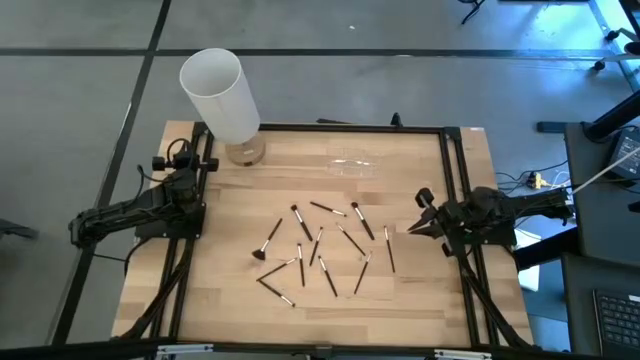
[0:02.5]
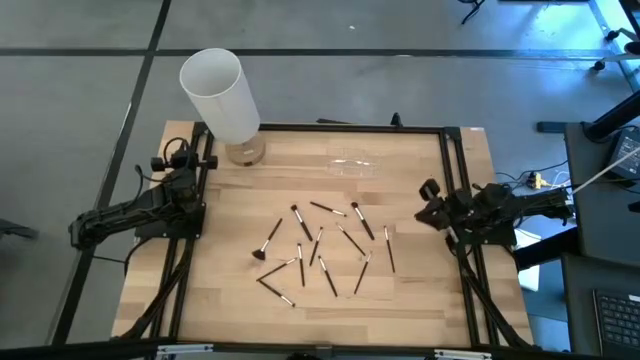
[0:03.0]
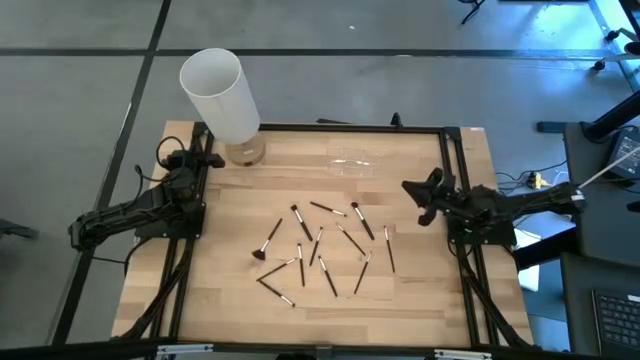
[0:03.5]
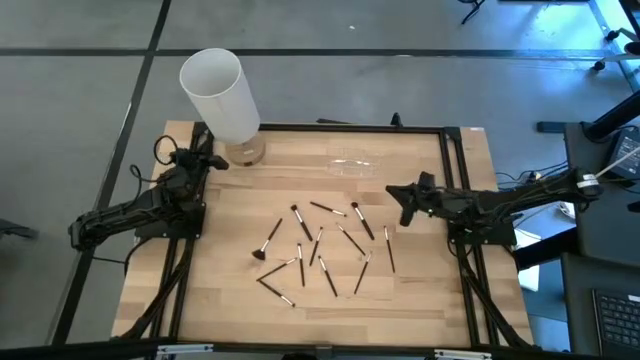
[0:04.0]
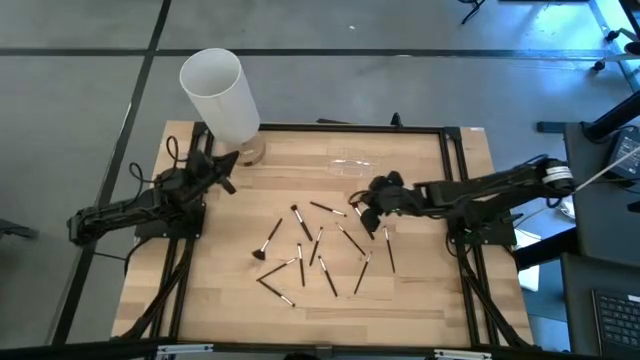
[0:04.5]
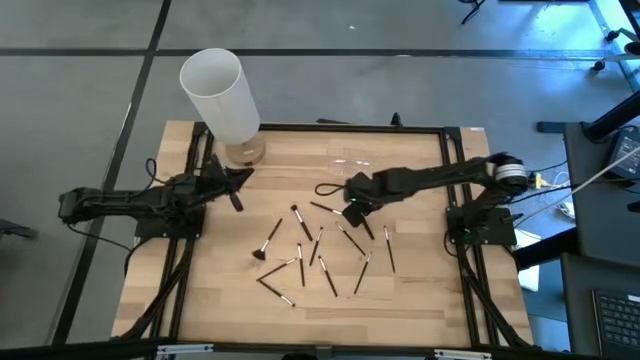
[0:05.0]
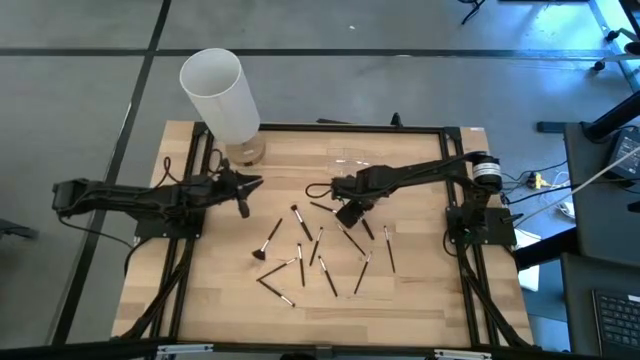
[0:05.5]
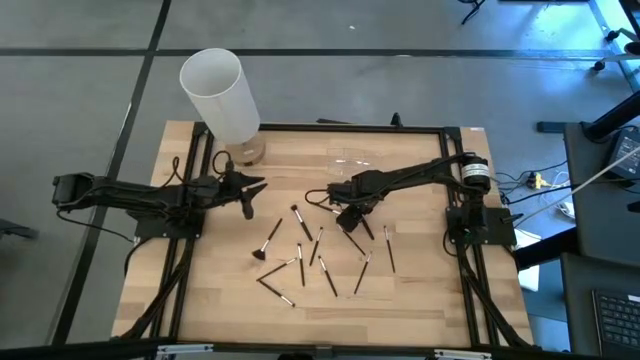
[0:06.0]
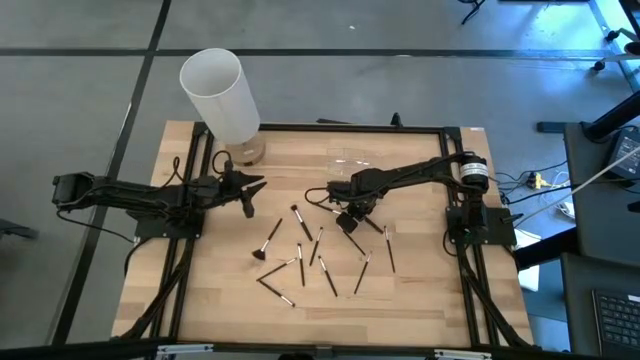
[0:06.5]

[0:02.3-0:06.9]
Task: Put items in baskets/containers
Put the black powder brush into the transparent organizer

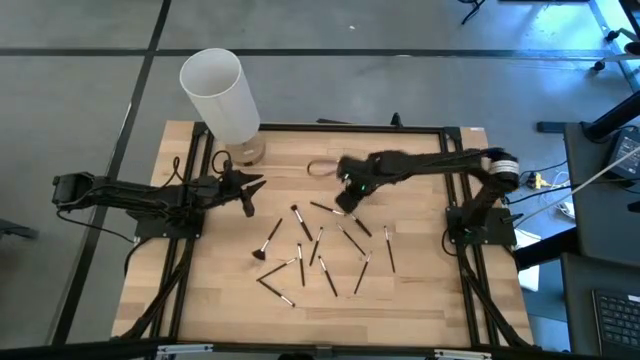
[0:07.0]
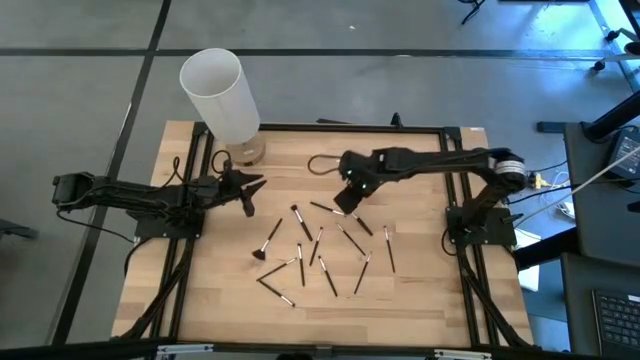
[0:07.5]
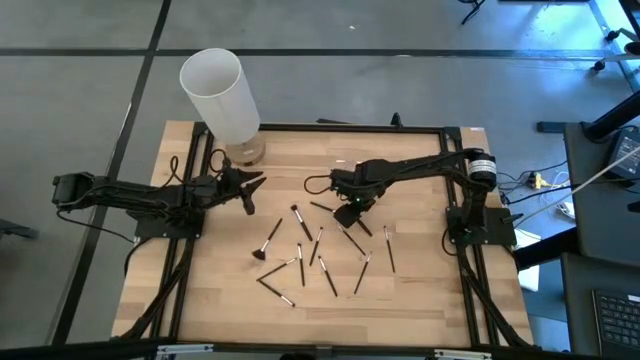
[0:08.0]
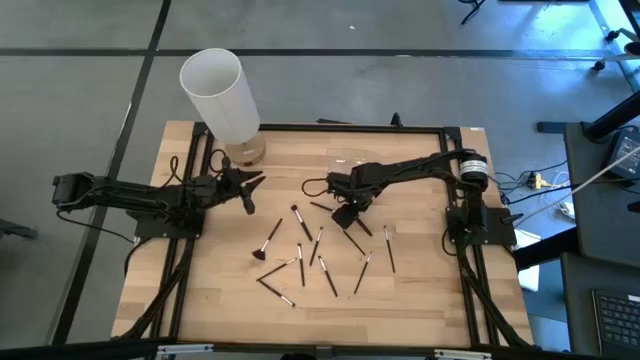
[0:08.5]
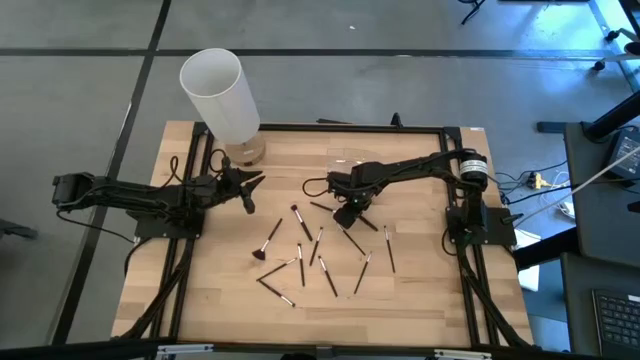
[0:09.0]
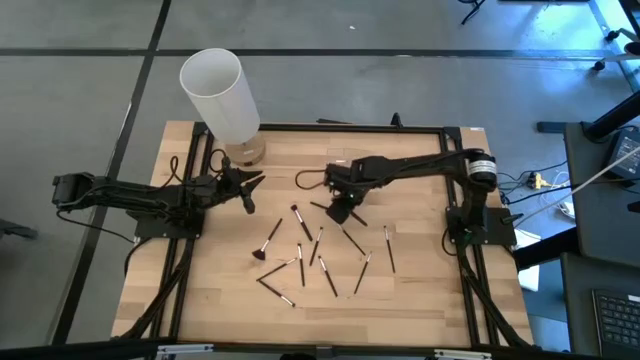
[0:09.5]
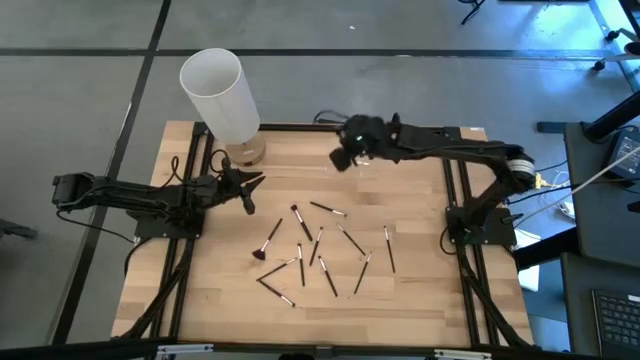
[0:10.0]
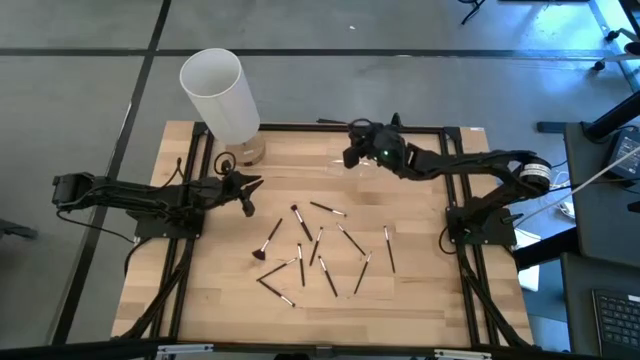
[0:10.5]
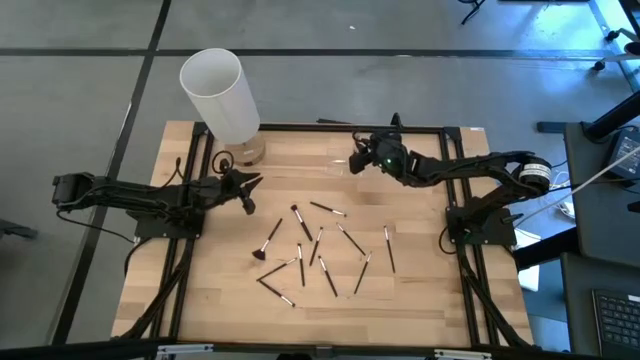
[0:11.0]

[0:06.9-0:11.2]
Put the black powder brush into the transparent organizer

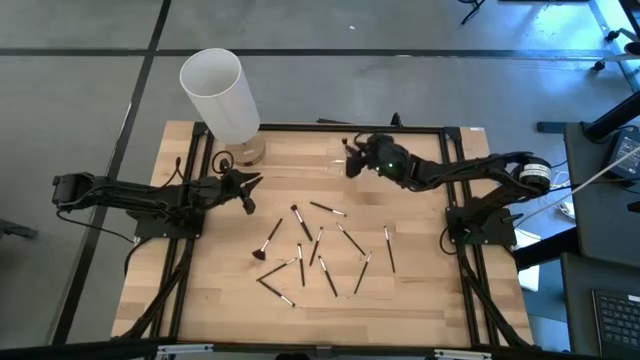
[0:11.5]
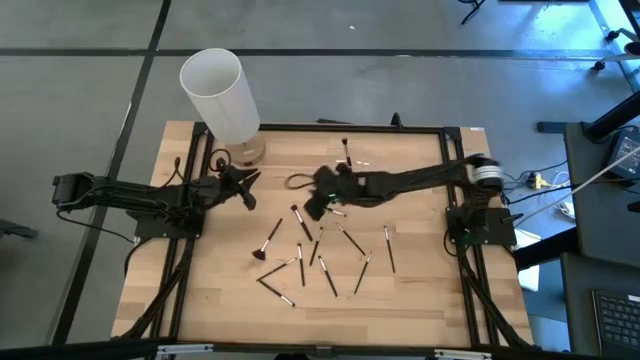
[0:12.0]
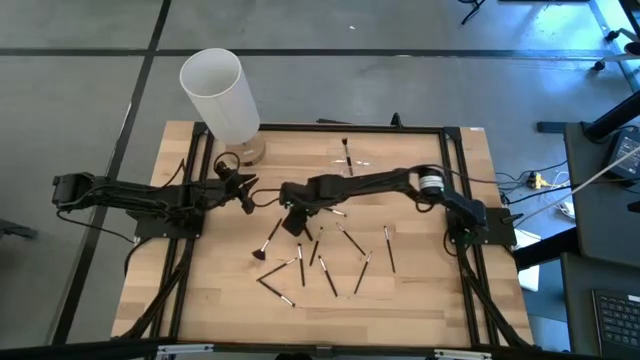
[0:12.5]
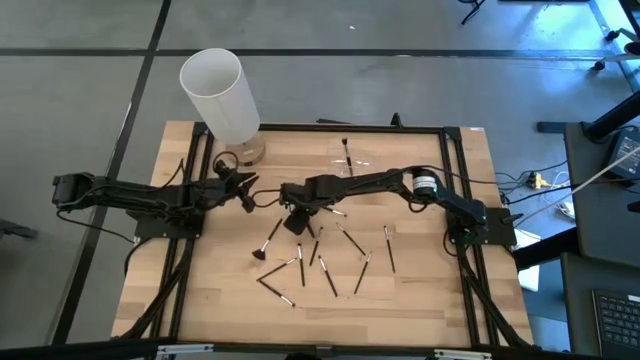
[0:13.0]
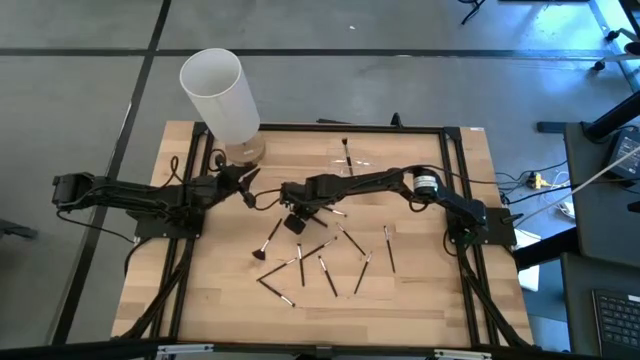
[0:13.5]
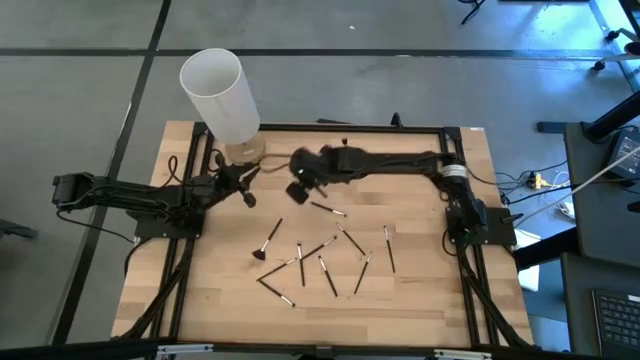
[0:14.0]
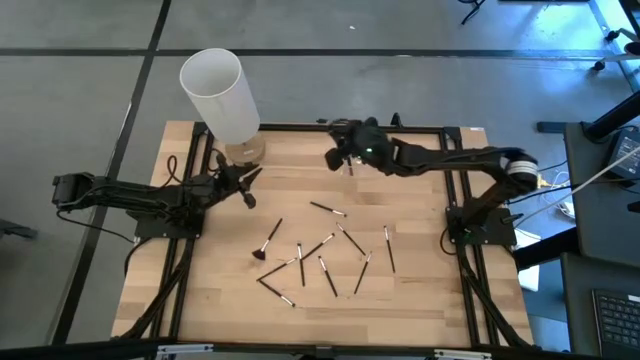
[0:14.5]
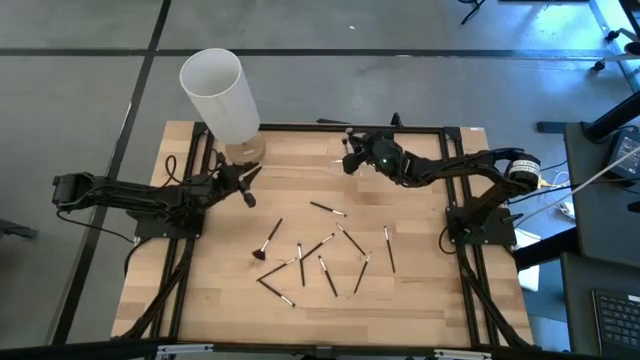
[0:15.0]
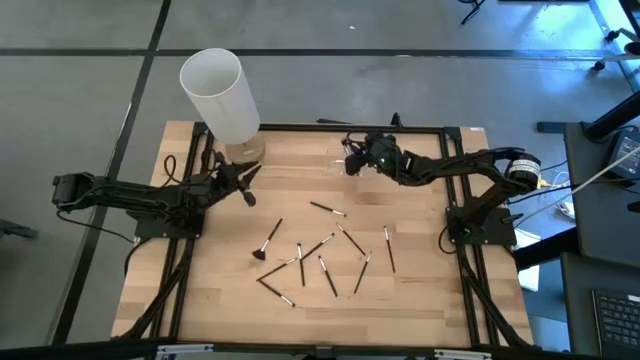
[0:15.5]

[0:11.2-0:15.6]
Put the black powder brush into the transparent organizer

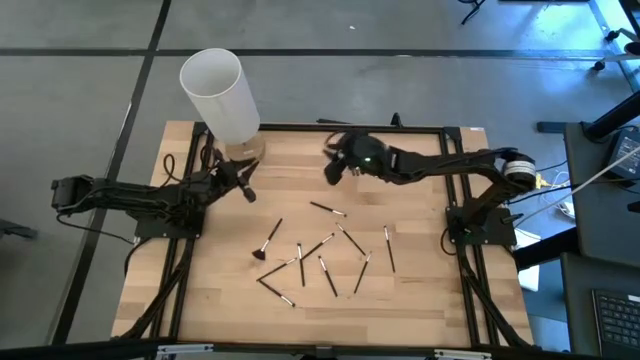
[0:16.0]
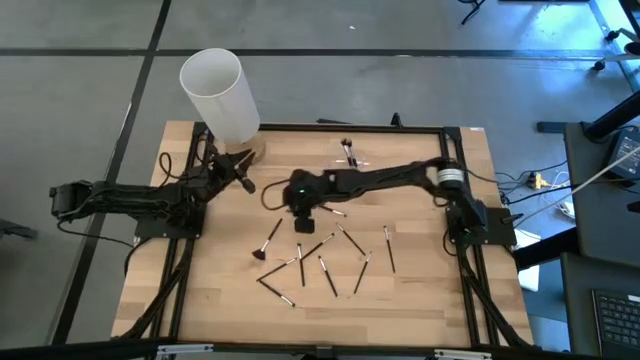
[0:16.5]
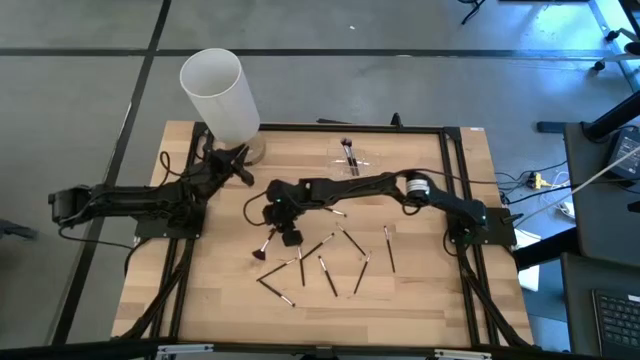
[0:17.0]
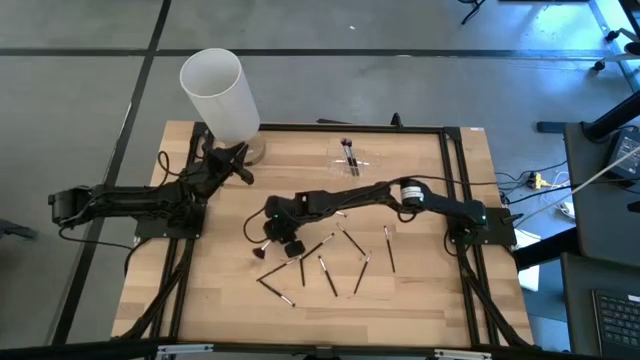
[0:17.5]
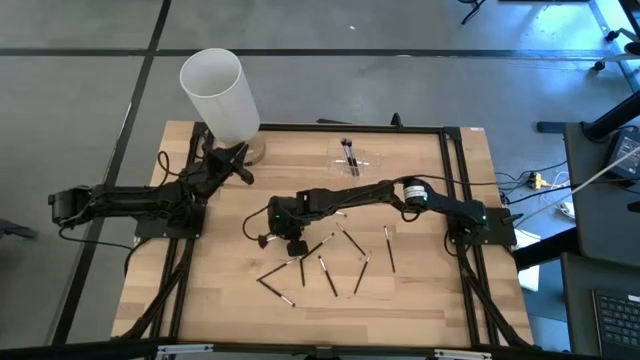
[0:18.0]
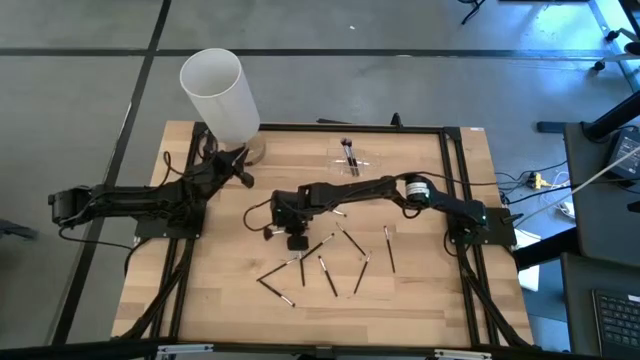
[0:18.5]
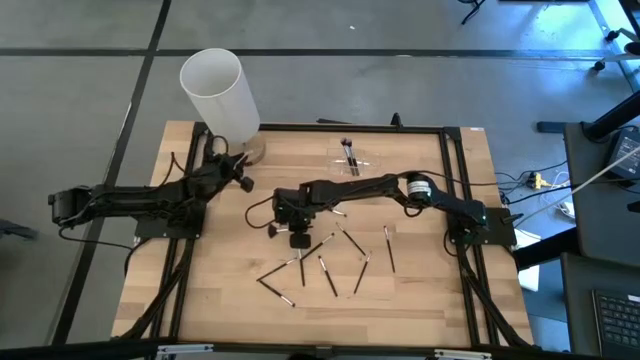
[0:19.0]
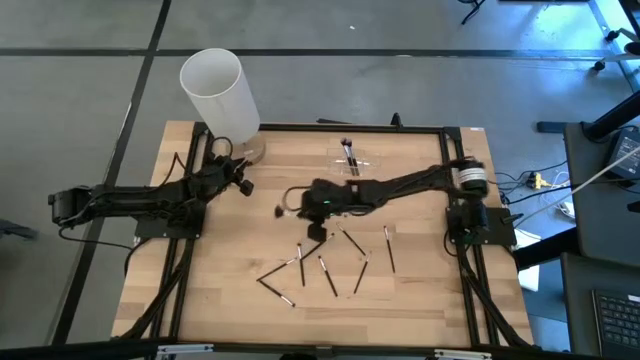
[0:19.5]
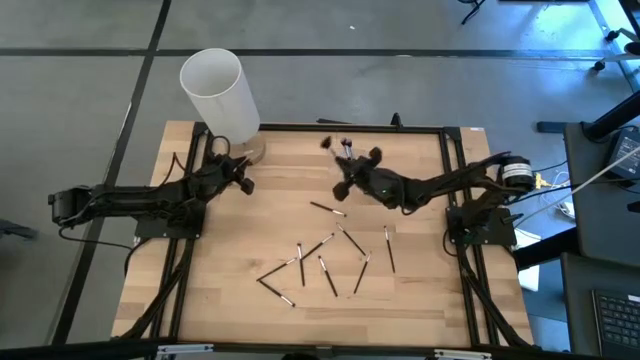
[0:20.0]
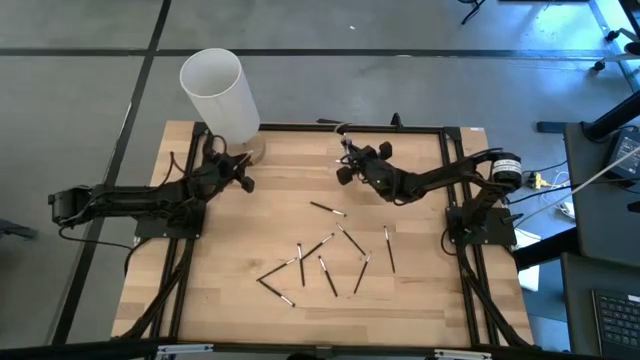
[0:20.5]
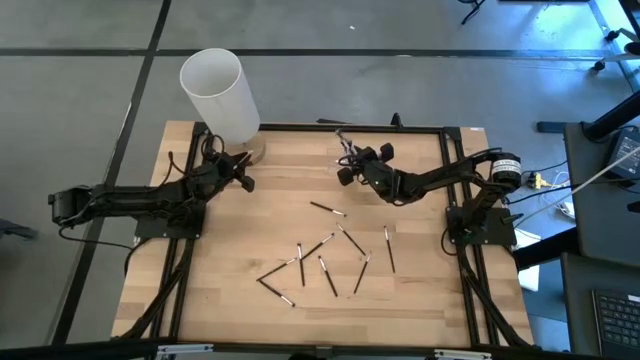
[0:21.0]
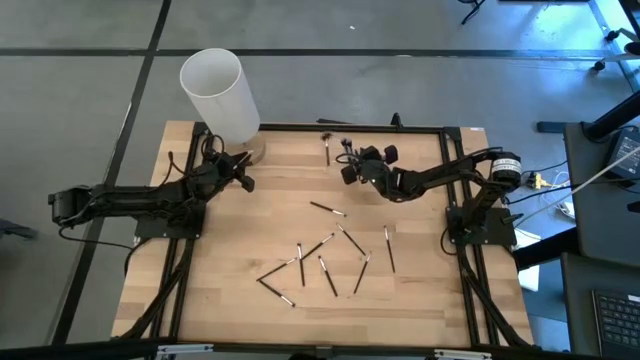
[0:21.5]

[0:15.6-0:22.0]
Put the black highlighter brush into the transparent organizer

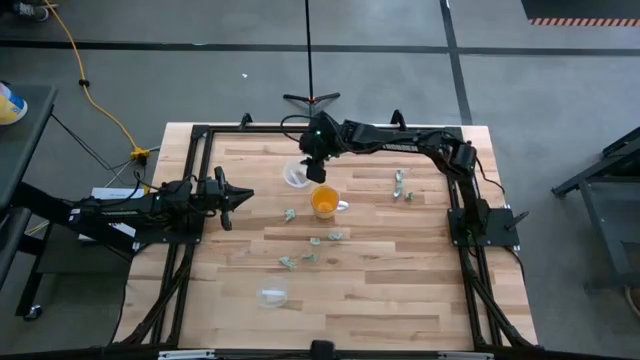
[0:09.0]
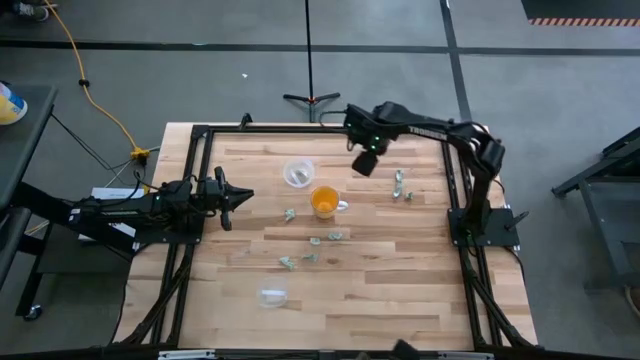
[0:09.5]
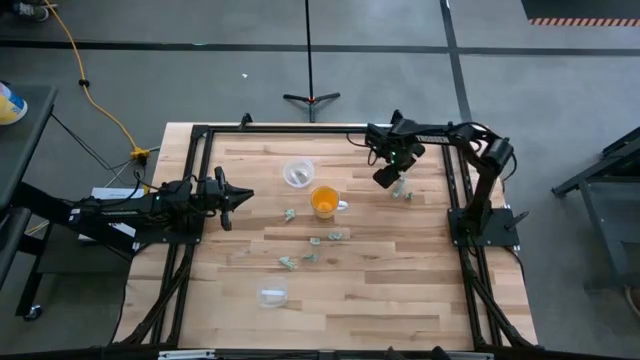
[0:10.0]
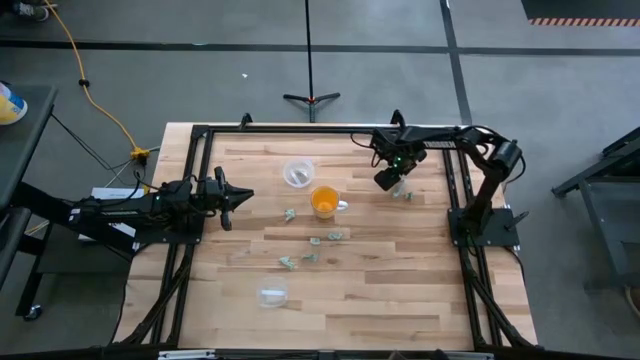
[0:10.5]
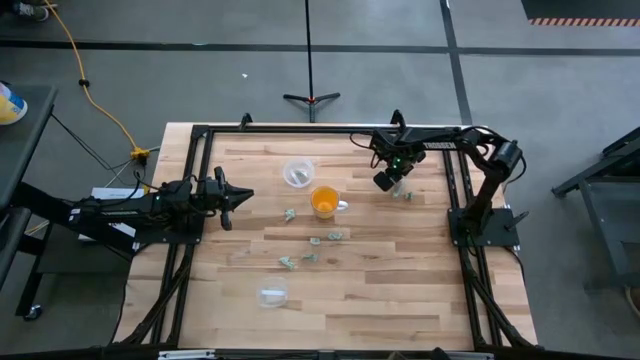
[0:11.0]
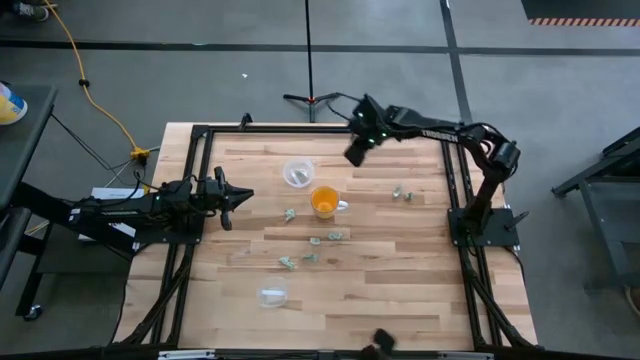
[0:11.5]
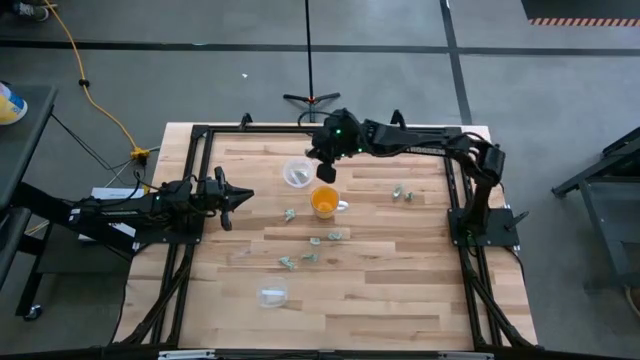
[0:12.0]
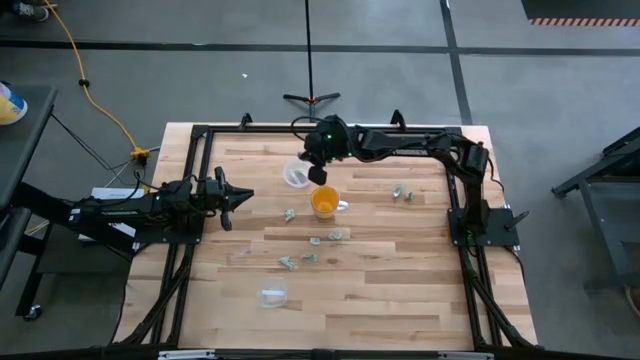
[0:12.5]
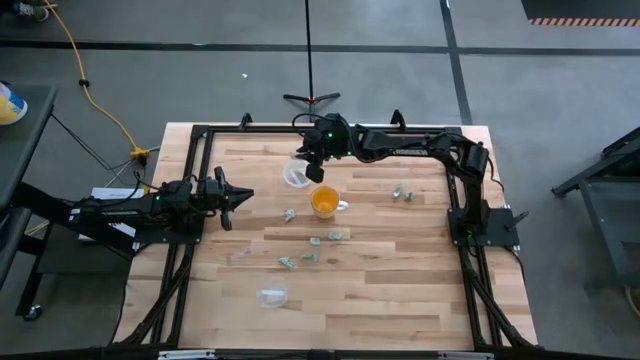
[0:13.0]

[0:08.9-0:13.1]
Task: Pick and place items into bin
Put the light green stevia packet into the top transparent bin
